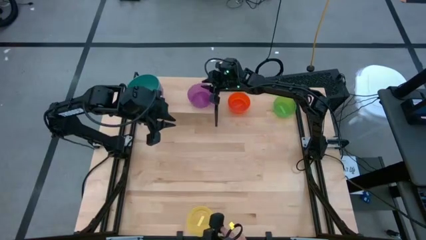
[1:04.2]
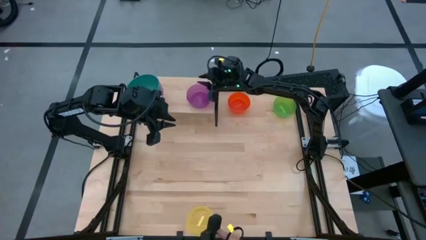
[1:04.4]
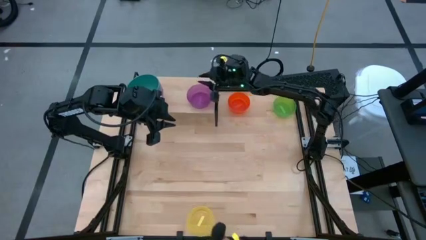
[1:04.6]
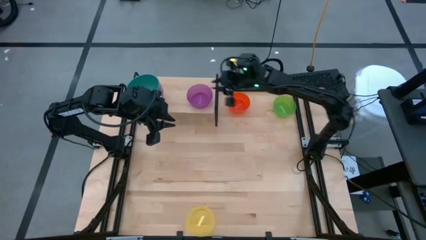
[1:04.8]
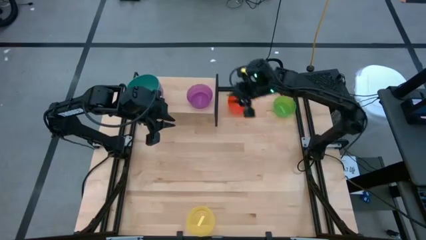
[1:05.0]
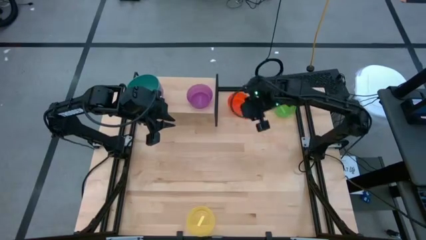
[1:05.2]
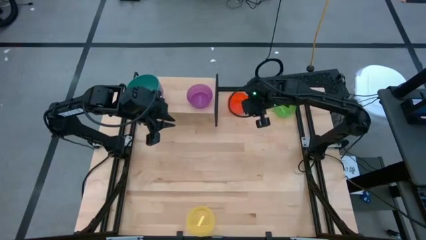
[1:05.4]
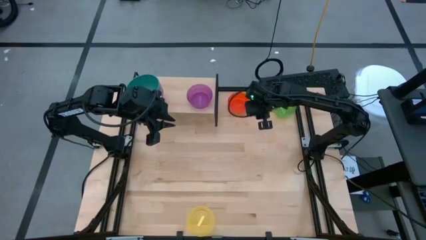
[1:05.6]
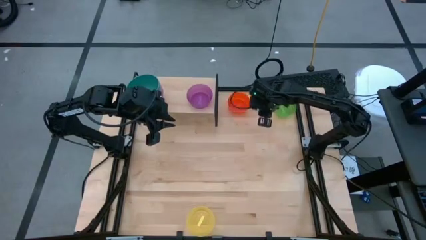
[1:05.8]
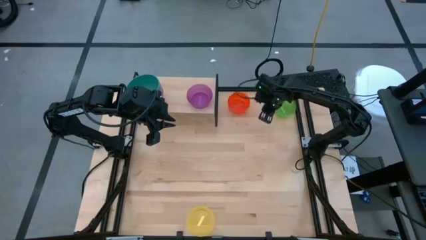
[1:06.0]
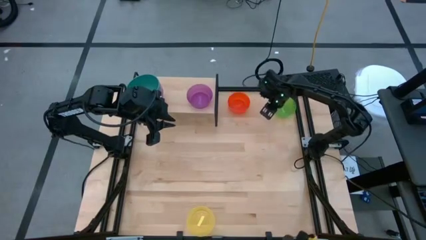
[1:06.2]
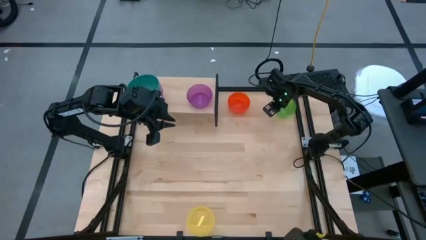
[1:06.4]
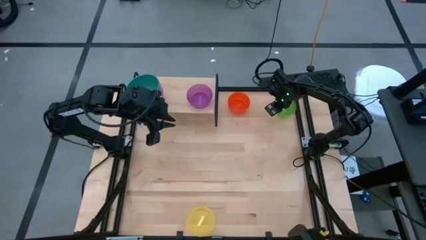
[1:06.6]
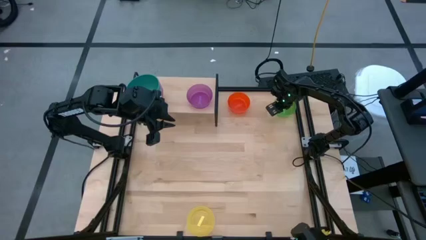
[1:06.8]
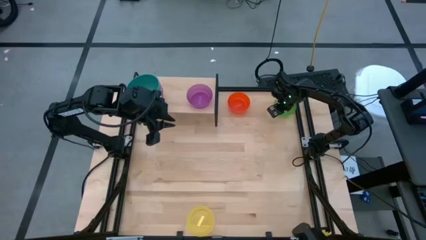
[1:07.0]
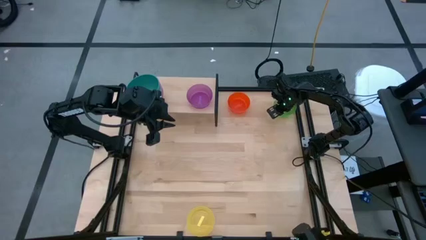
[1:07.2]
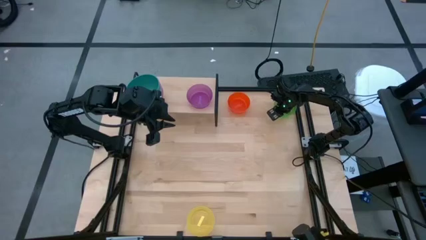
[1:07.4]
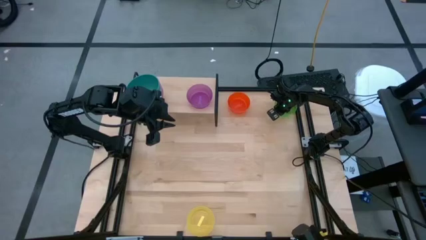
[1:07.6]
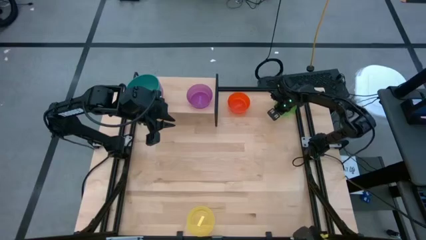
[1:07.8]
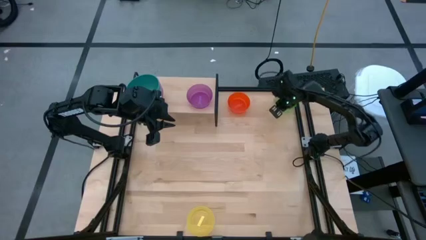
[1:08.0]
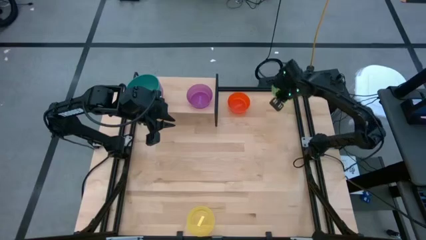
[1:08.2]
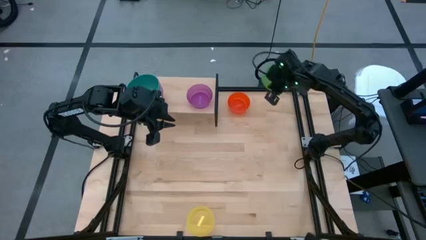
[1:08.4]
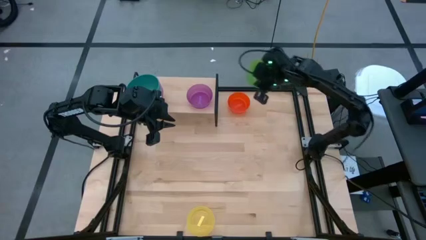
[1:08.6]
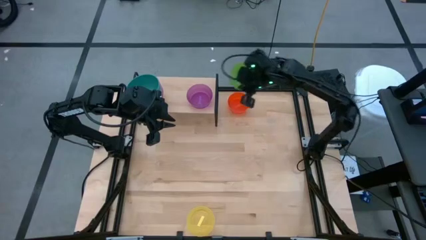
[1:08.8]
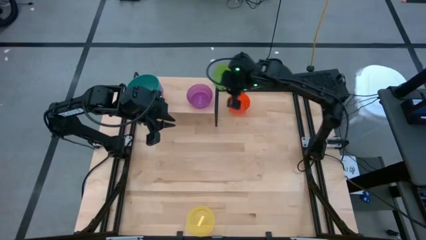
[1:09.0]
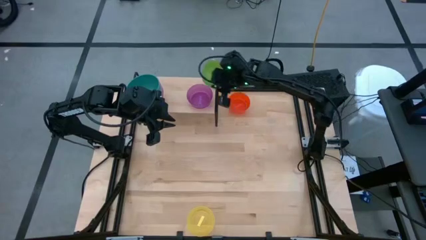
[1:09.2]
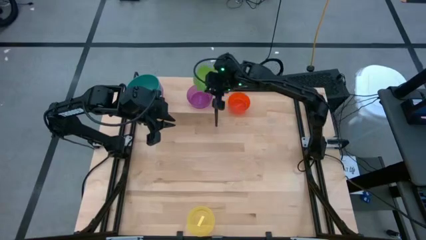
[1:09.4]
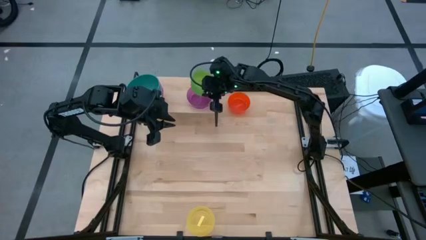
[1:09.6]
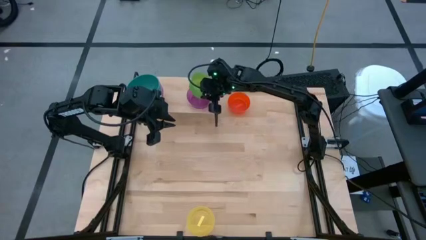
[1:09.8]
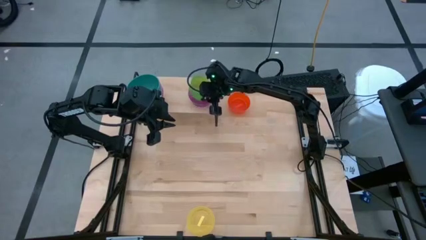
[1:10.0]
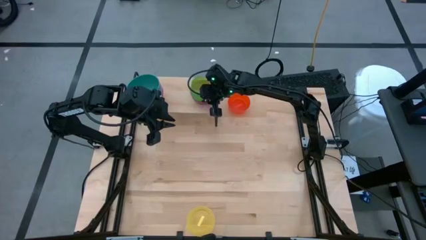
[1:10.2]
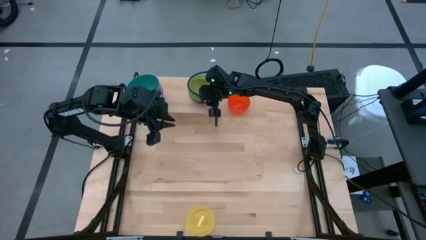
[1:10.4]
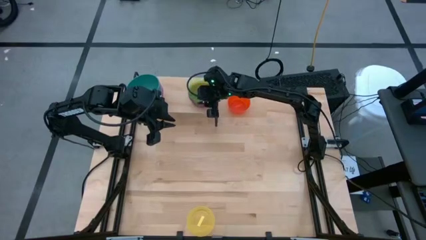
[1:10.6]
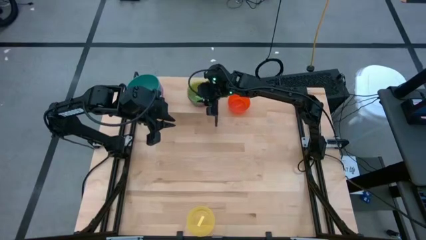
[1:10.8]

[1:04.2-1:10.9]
Task: Place and stack bowls onto a shelf
Stack the light green bowl on top of the purple bowl on the shelf

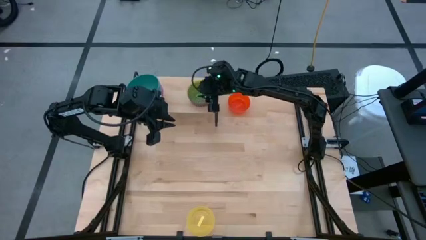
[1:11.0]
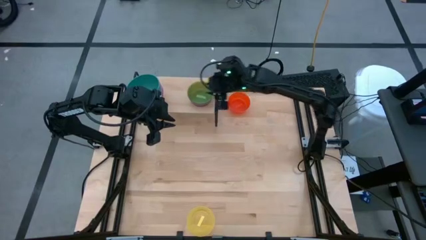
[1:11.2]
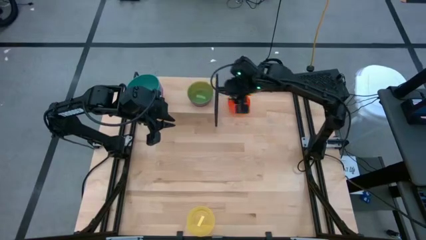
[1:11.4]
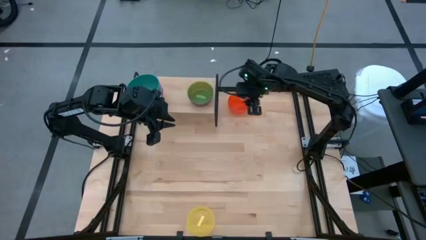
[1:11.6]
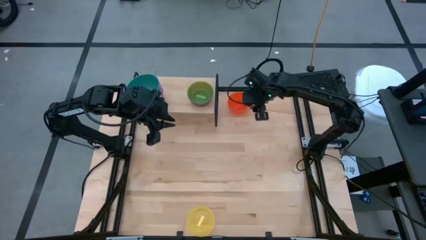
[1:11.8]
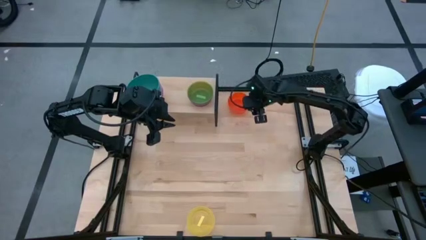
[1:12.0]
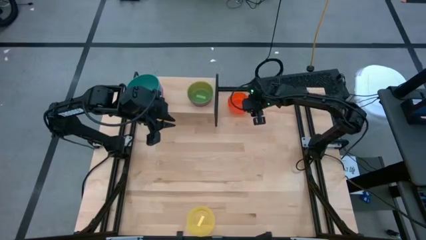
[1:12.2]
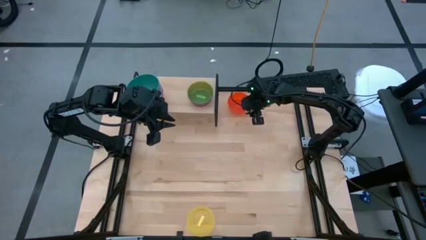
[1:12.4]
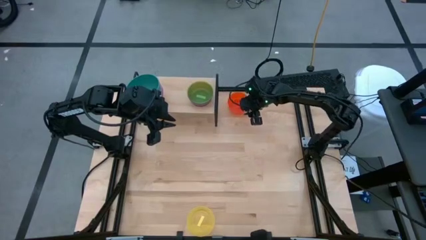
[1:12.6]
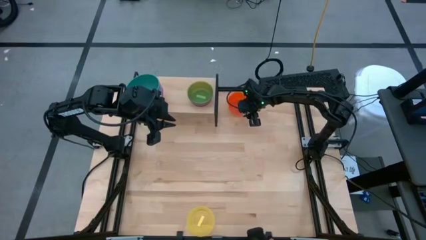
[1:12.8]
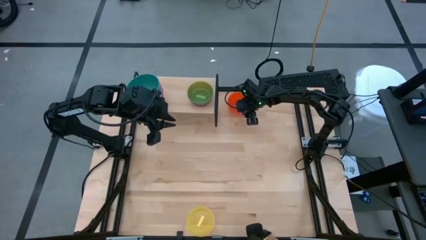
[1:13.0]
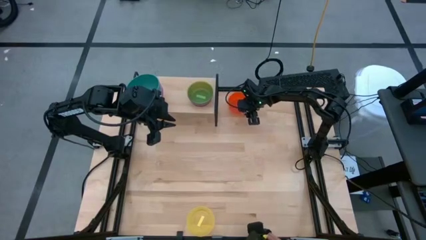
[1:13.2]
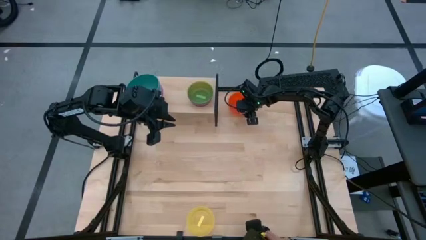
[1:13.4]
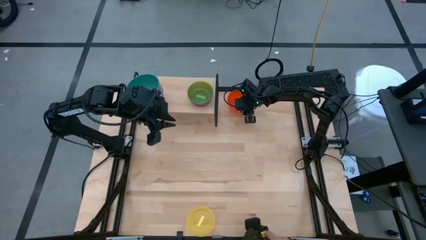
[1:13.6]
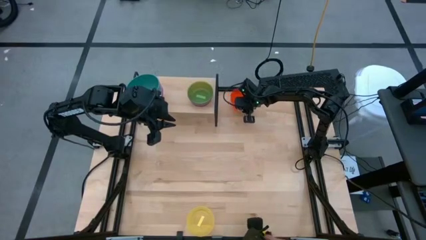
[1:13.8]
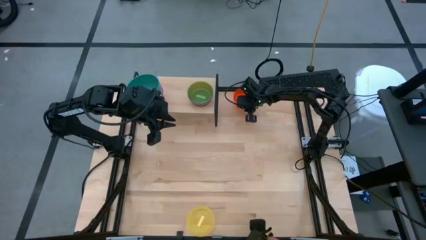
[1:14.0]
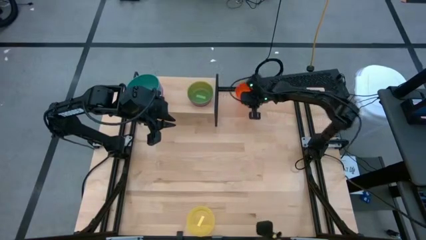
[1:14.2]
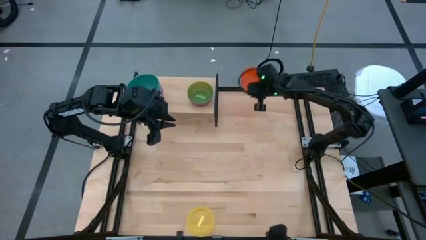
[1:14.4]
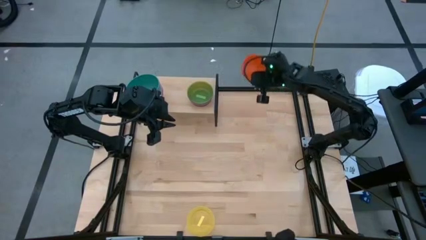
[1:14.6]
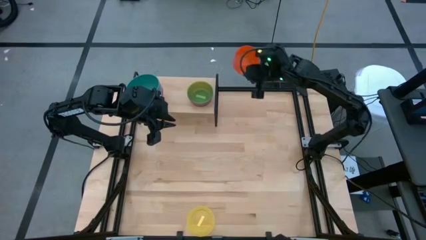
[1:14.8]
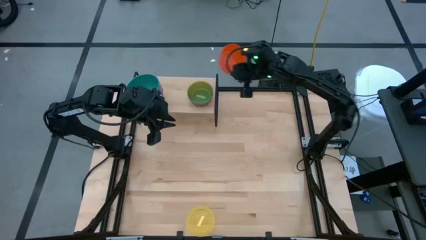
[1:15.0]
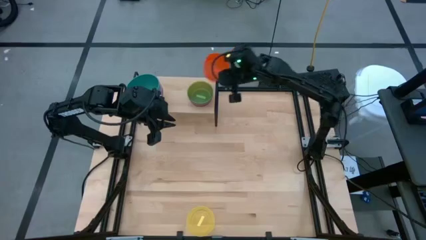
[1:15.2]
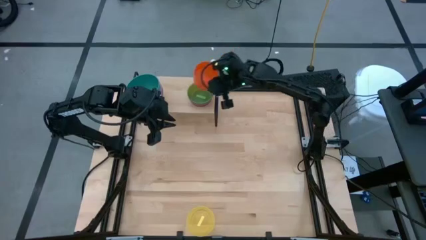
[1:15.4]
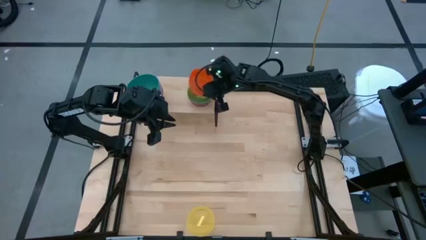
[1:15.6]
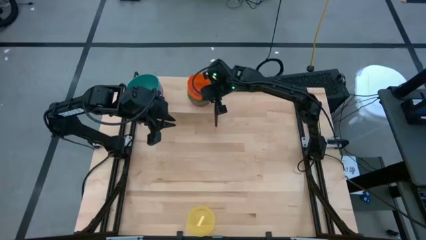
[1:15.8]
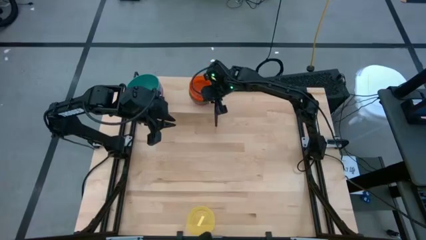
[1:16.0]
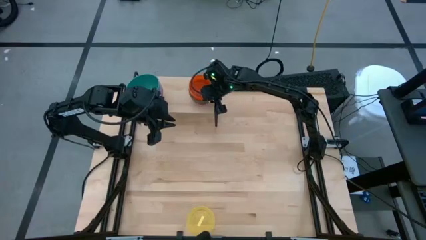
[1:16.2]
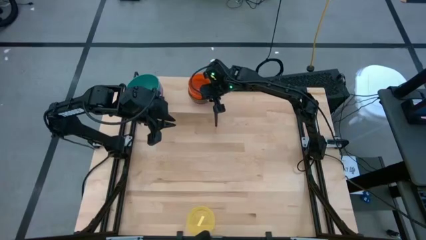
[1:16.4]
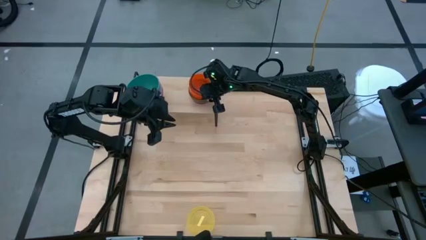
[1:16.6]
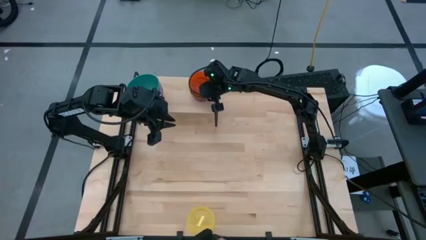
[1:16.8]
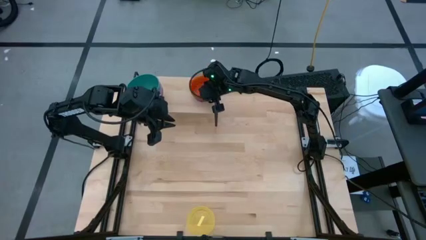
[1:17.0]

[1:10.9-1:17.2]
Stack the orange bowl on top of the light green bowl on the shelf

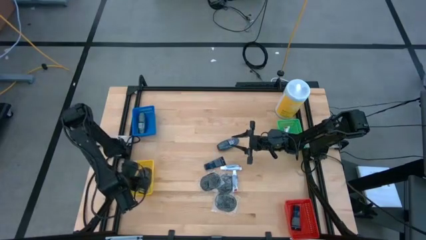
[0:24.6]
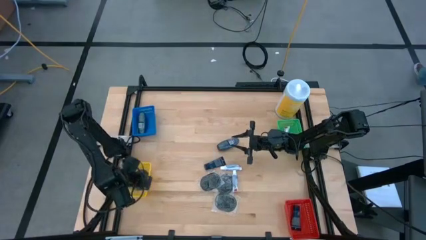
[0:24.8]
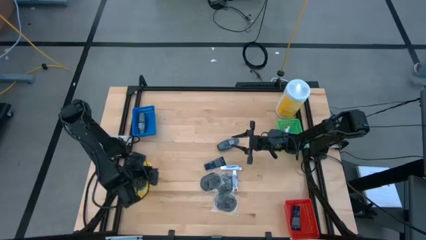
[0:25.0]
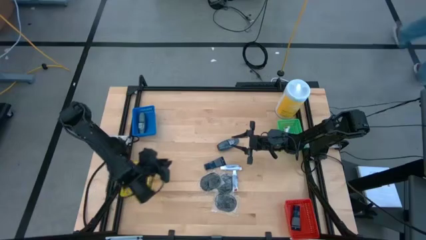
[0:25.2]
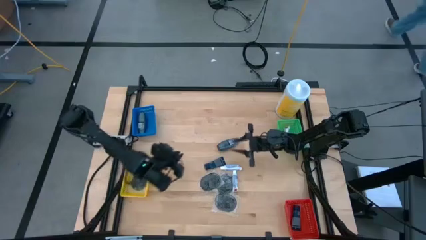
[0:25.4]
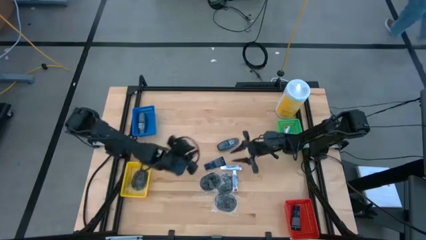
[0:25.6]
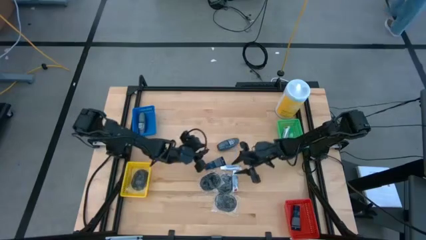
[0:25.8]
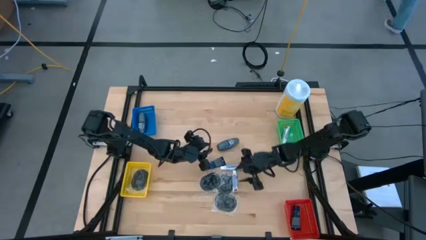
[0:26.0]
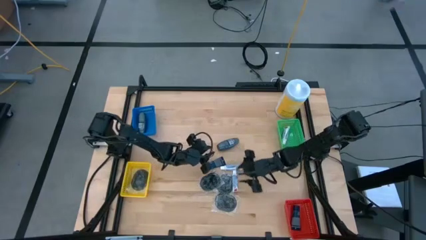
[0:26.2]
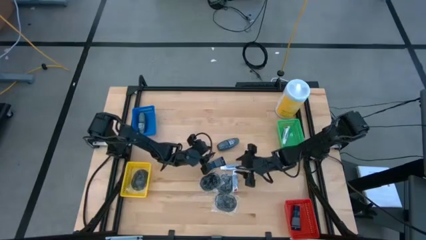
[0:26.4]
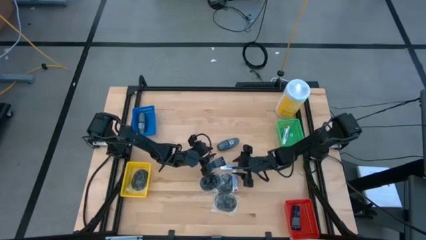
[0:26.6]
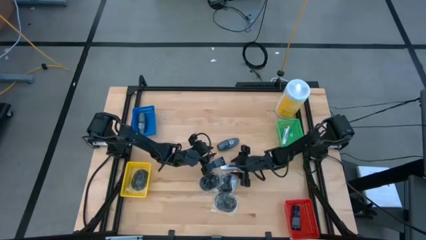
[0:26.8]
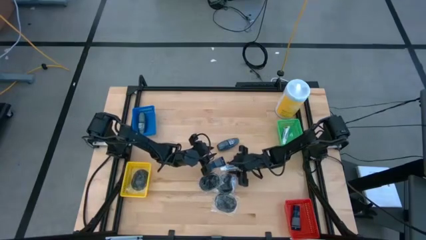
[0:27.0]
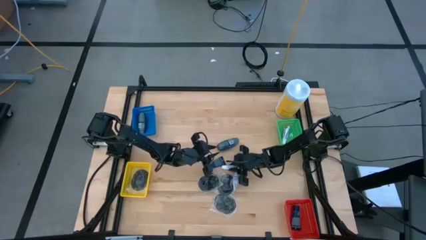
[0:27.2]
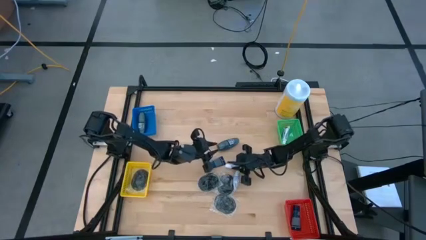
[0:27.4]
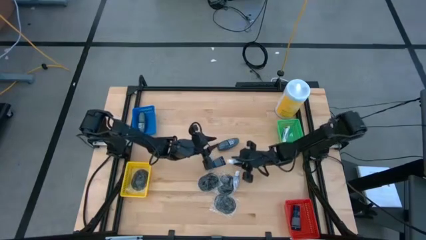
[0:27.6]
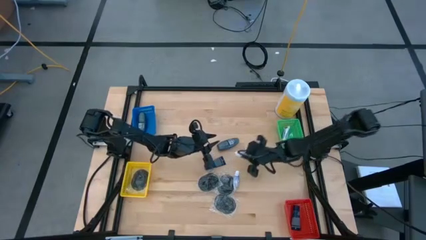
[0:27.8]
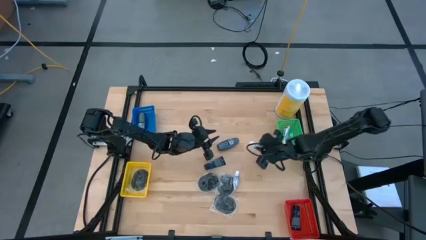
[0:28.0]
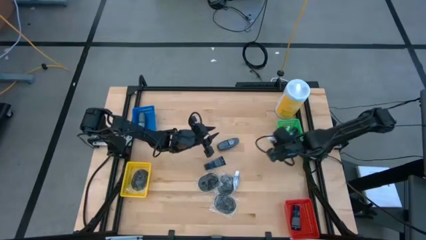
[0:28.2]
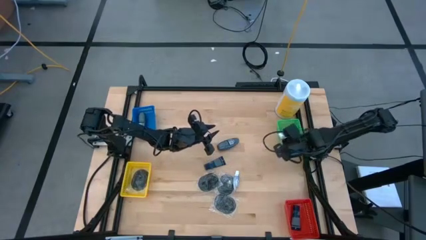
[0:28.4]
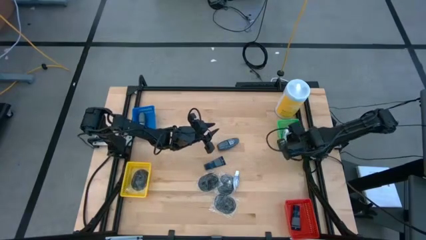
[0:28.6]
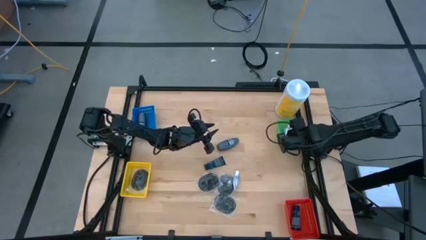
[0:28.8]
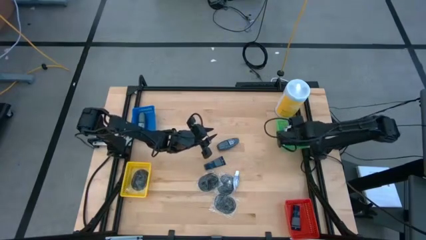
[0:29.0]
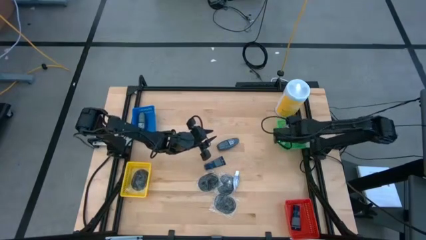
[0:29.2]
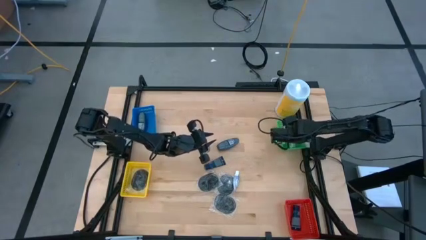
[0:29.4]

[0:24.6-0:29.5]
Task: Pick & Place Travel size toiletries
Put the white toothpaste into the green bin
